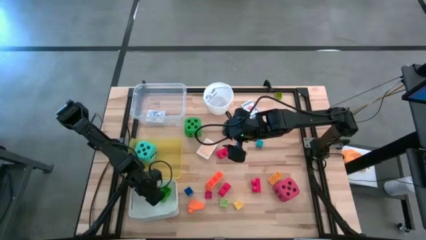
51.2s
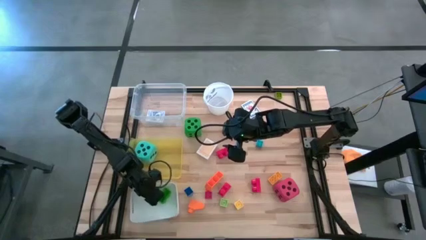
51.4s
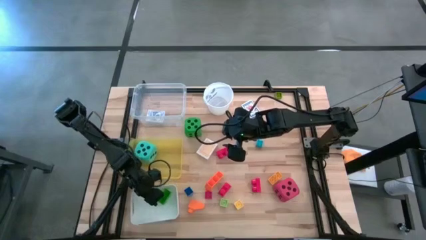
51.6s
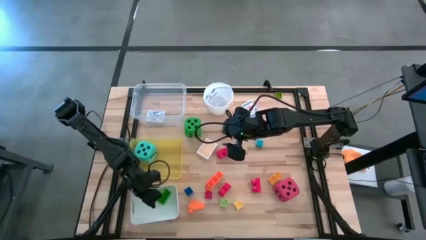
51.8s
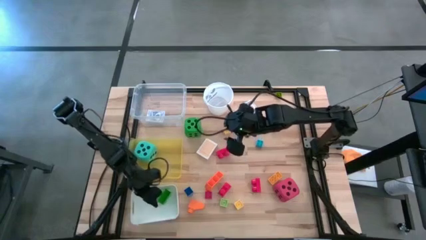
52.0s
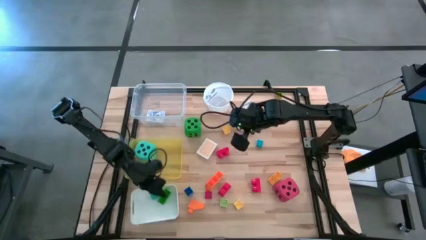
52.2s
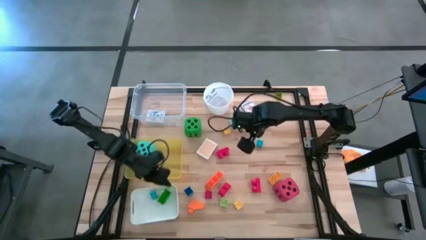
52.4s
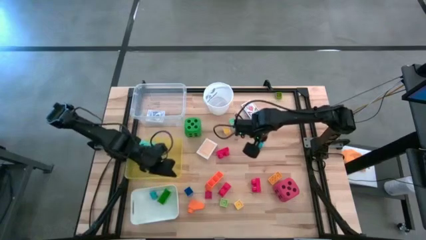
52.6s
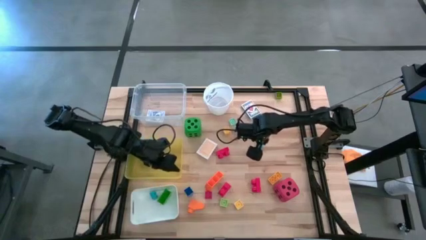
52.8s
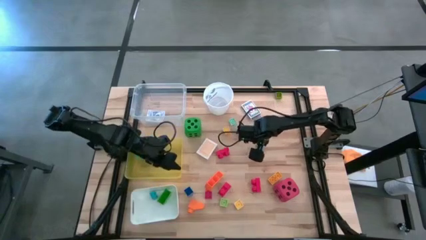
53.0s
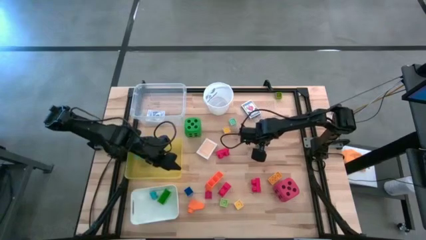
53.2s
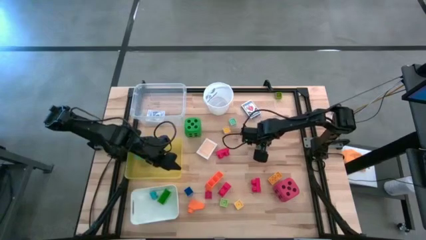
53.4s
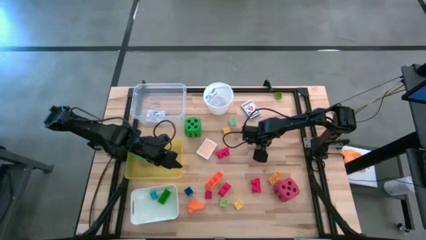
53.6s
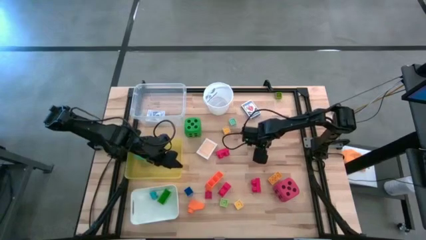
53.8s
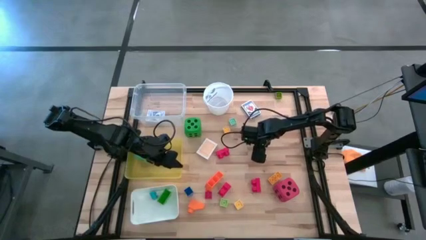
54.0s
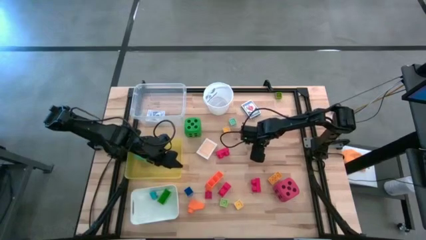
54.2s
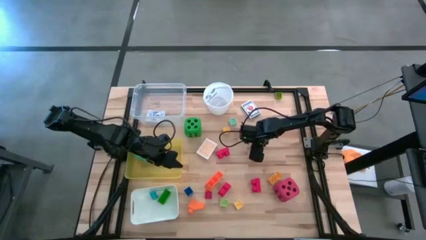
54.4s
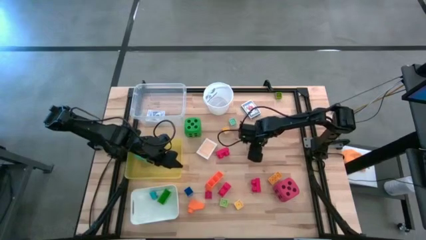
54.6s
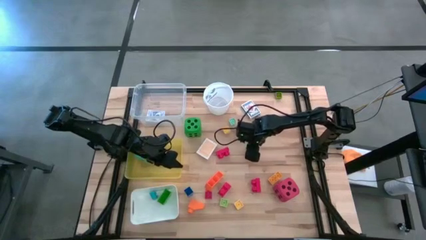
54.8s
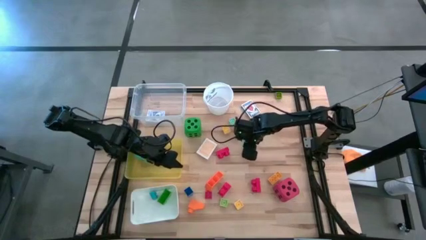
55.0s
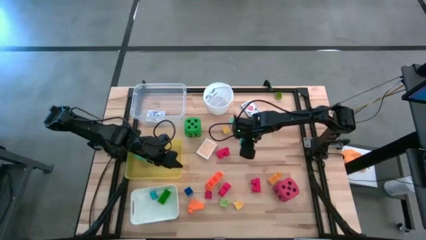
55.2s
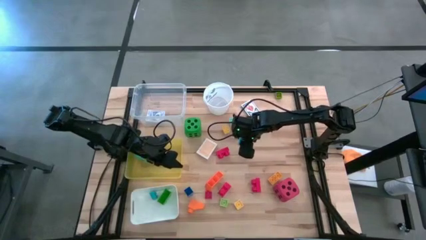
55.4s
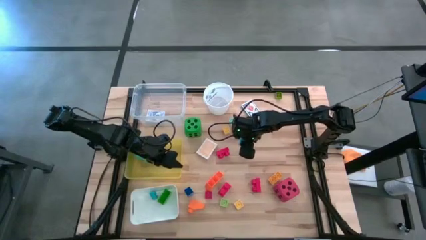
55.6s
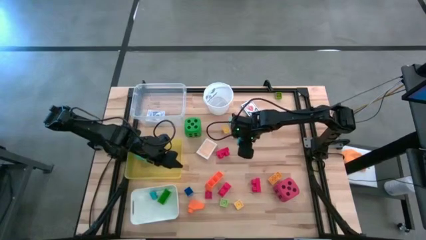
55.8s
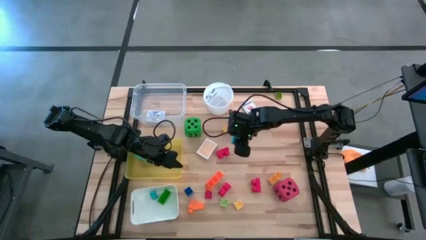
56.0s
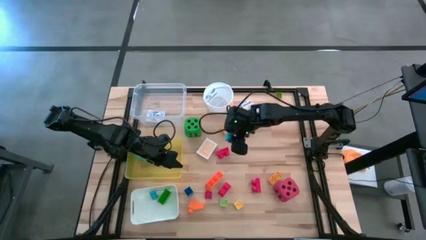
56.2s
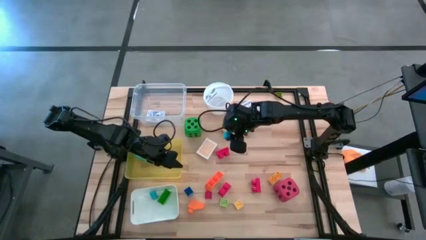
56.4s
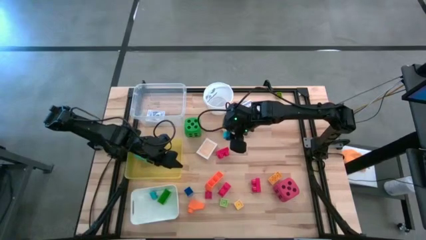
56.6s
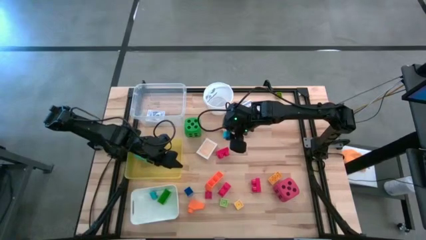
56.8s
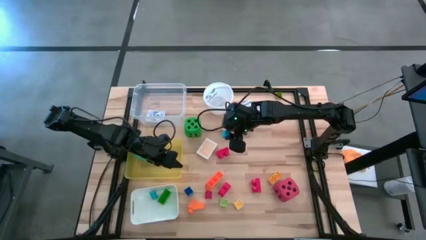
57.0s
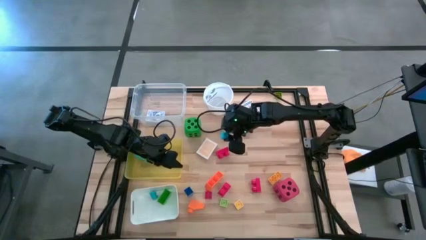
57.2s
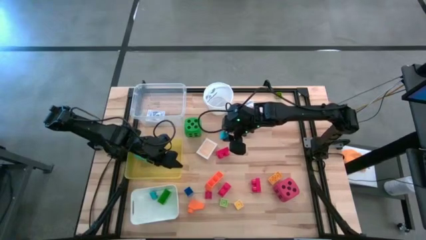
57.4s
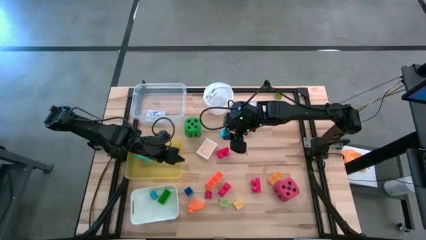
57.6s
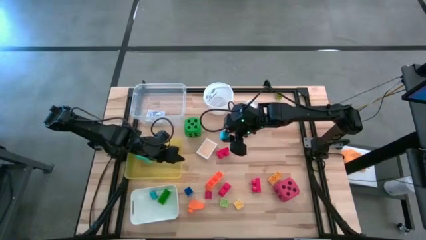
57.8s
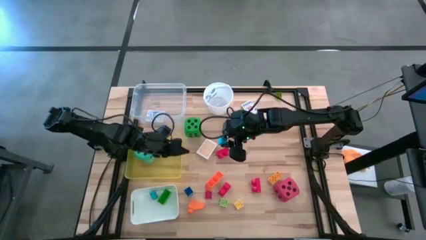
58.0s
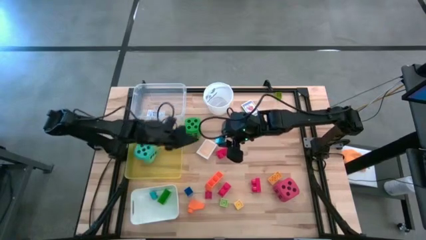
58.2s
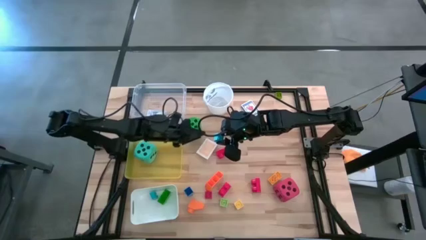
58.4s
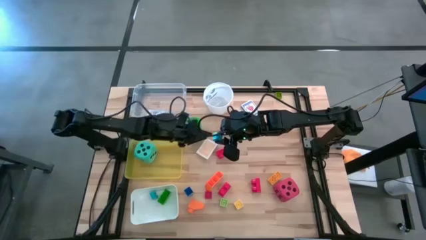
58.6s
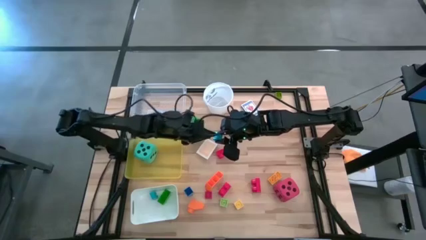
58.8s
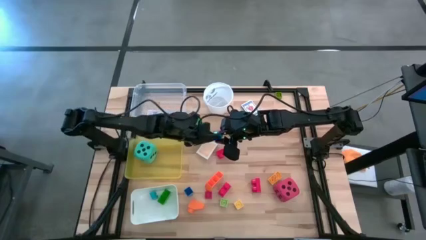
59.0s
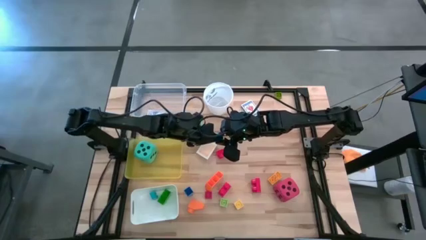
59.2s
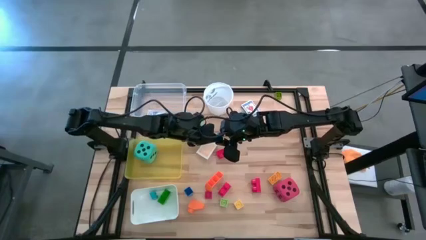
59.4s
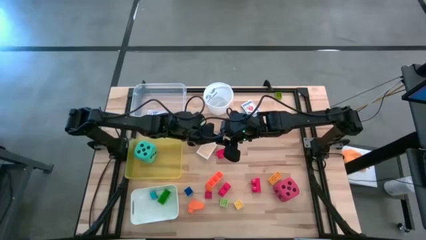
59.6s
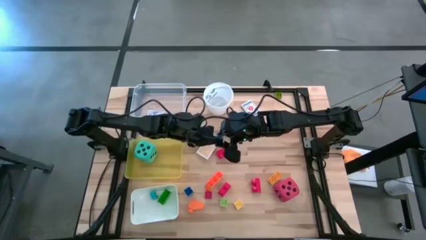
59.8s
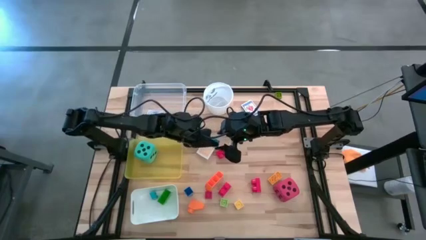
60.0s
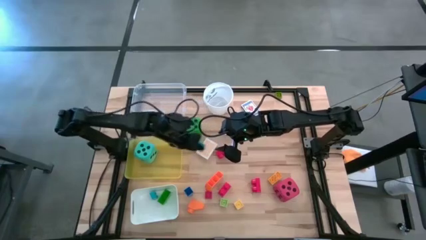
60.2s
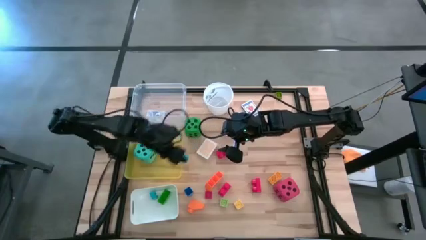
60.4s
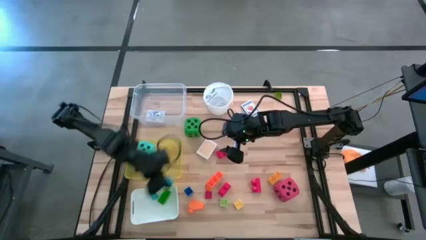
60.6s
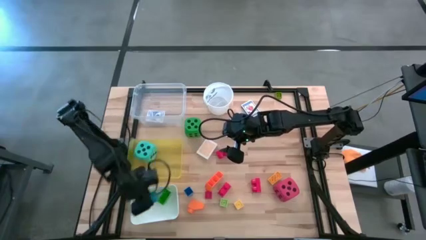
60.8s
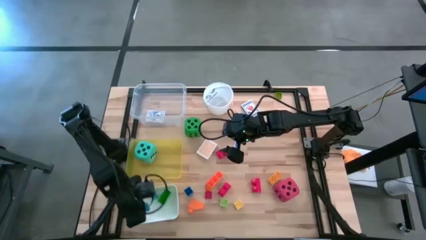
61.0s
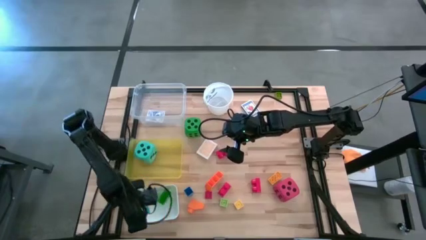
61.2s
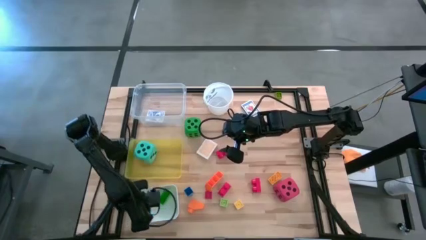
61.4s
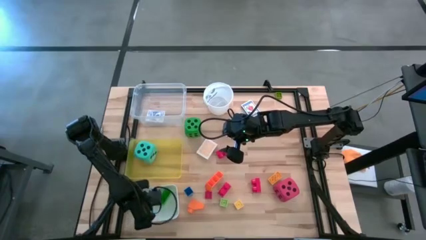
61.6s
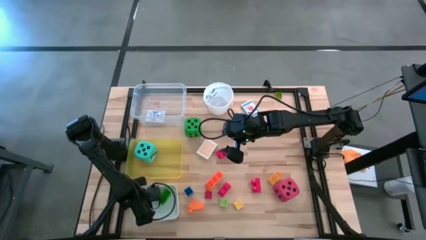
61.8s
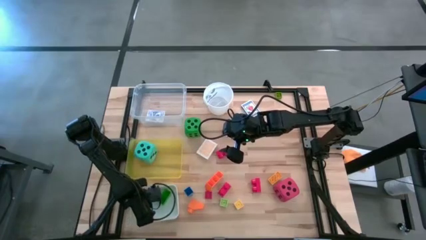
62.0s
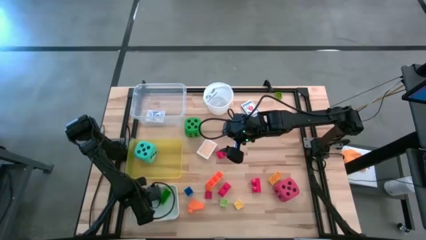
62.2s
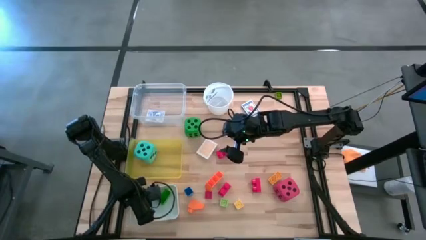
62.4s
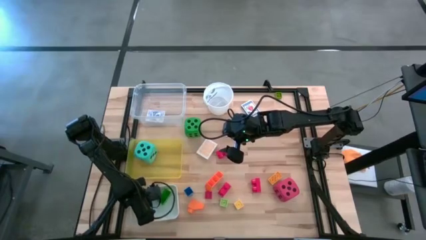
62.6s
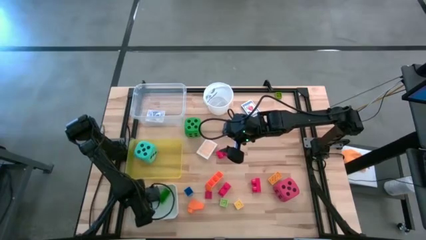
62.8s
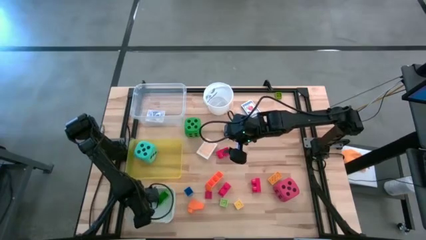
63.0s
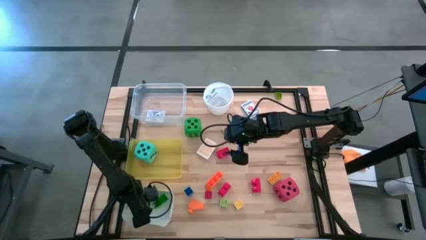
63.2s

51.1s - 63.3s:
Task: Pick & Place Toys
Put the blue game piece into the white bin

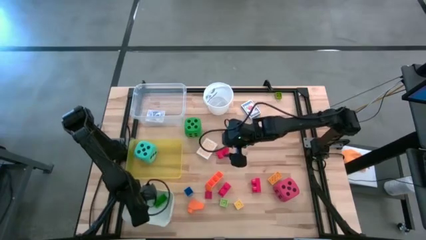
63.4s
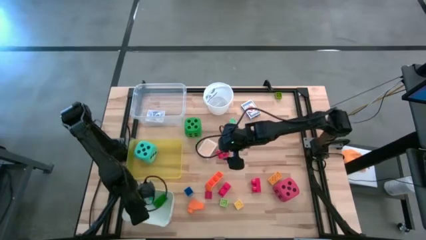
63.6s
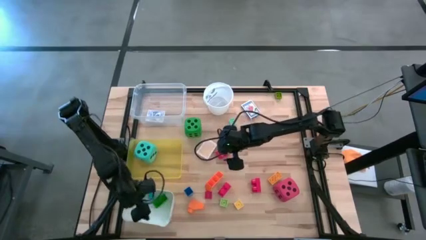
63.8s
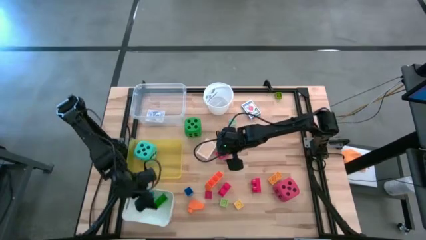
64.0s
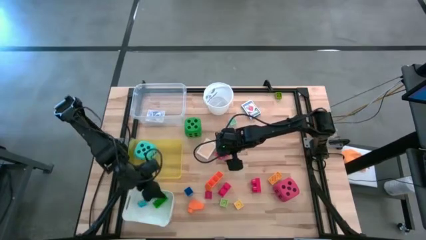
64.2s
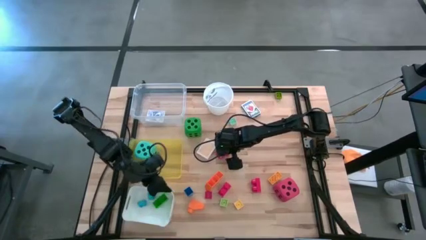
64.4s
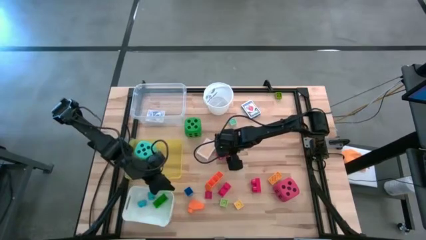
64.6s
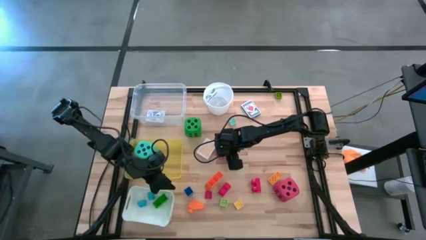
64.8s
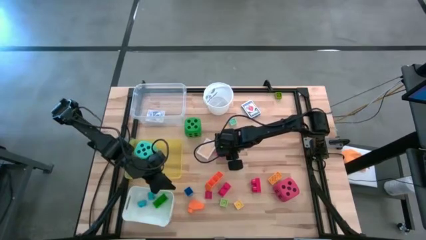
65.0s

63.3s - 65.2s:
Put the red game piece into the white bin

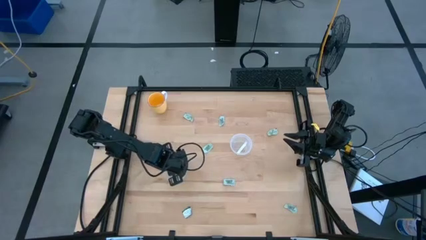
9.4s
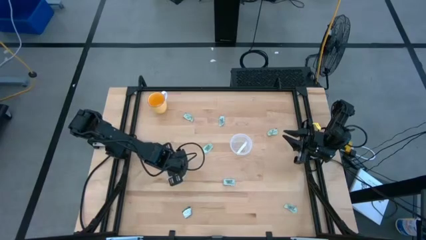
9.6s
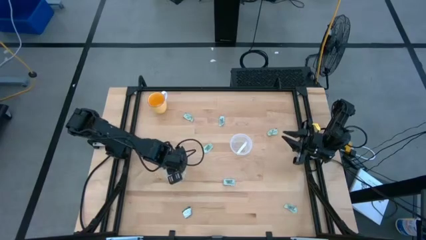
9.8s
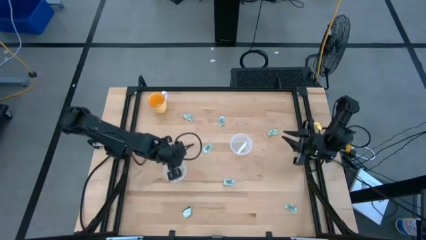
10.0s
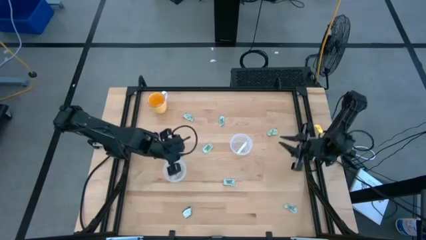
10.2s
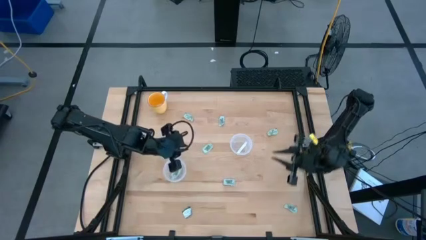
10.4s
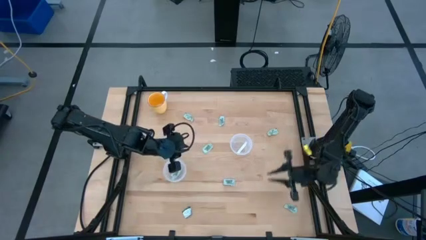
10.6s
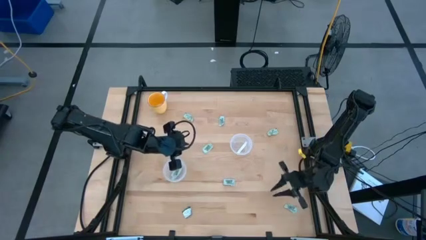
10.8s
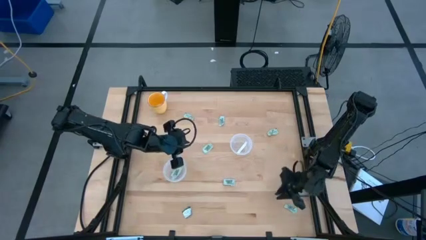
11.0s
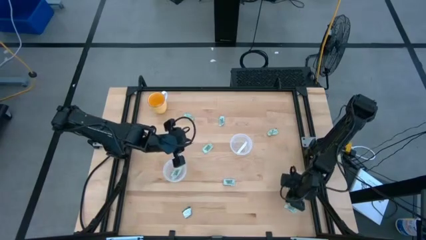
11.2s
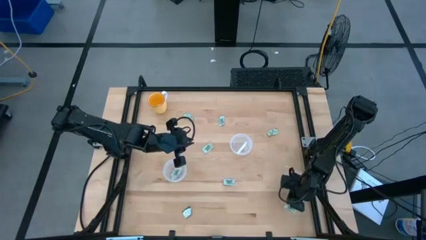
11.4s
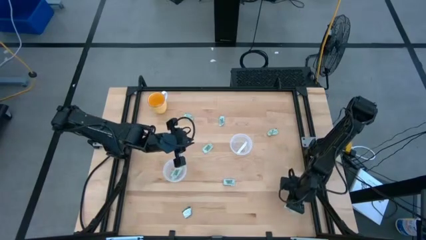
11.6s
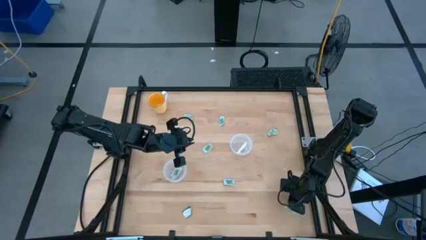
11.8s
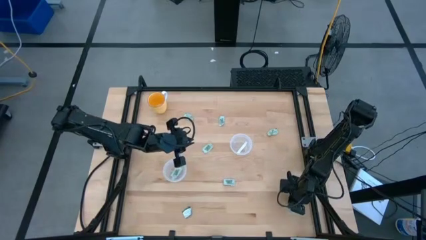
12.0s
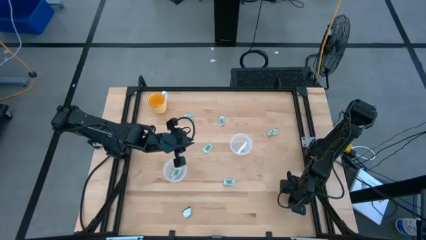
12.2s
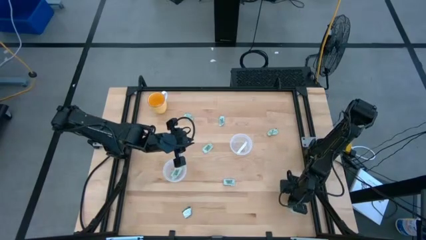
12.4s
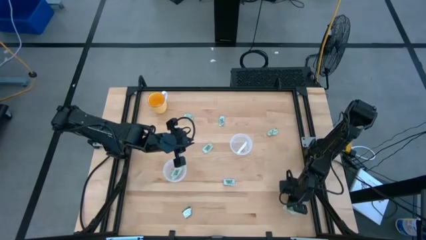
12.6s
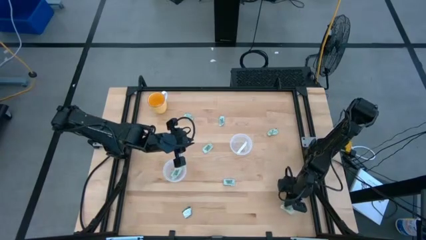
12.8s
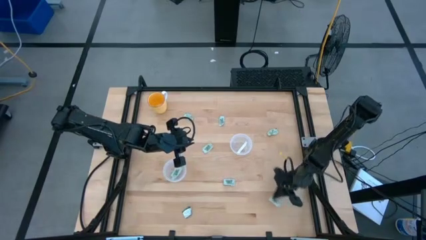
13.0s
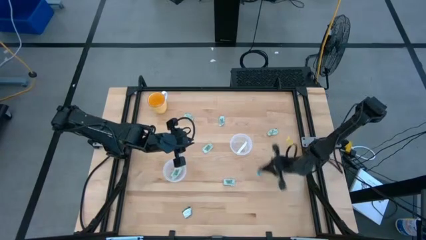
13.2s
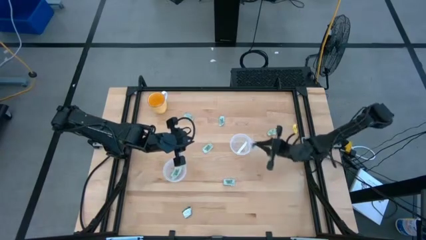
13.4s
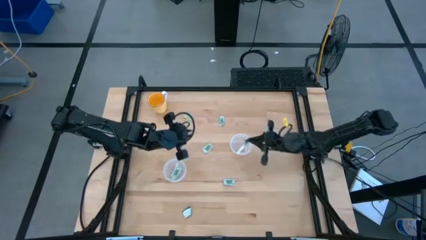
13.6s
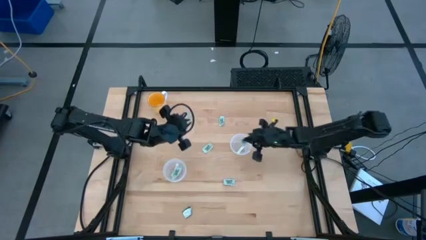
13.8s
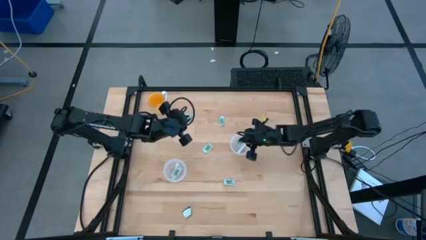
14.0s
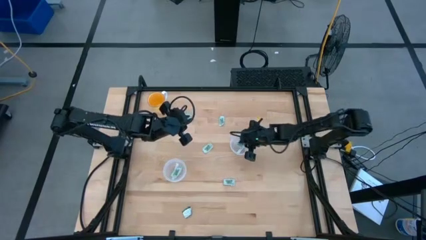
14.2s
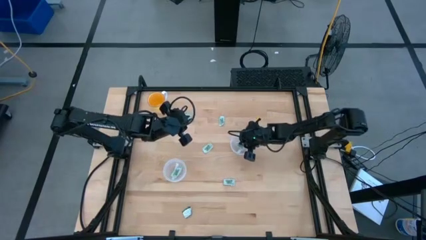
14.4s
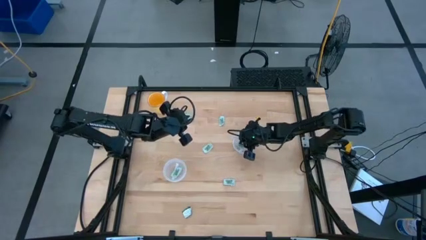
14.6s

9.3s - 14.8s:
Task: Pick and place Stevia / Truvia into bins
Put the white stevia packet into the top transparent container
